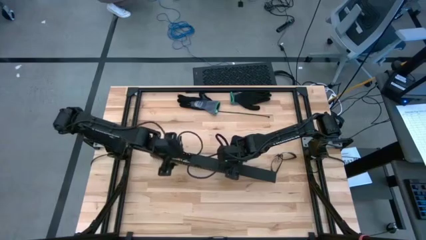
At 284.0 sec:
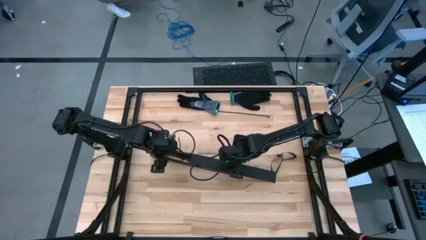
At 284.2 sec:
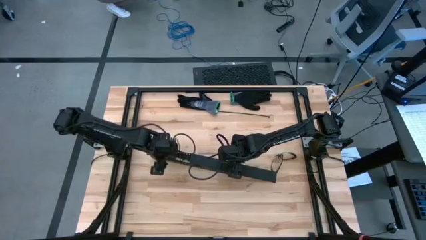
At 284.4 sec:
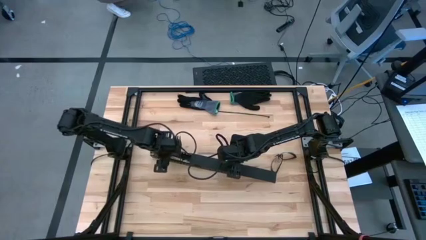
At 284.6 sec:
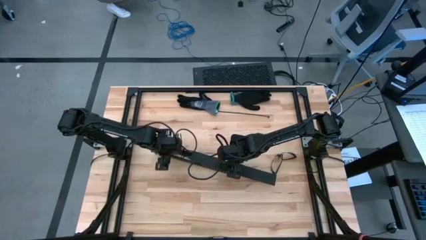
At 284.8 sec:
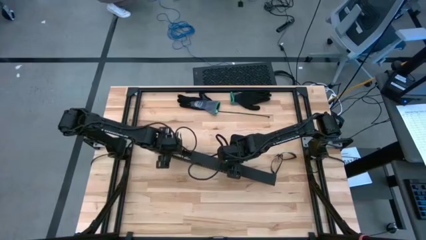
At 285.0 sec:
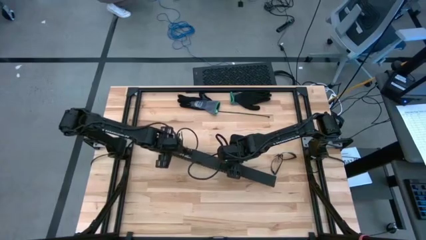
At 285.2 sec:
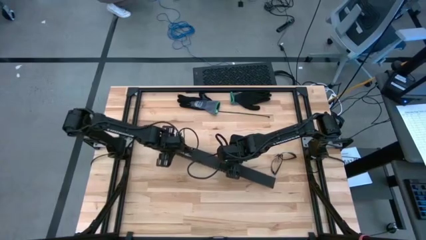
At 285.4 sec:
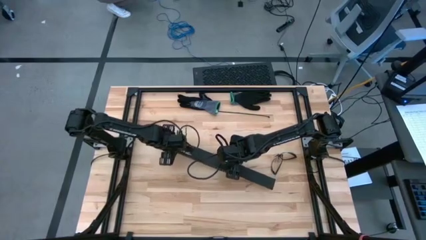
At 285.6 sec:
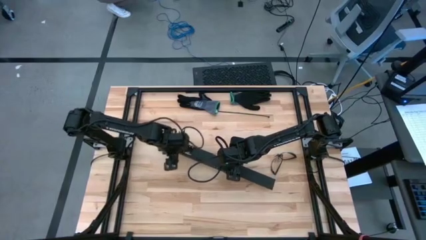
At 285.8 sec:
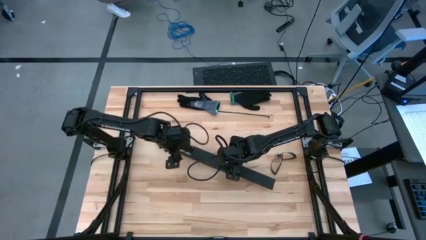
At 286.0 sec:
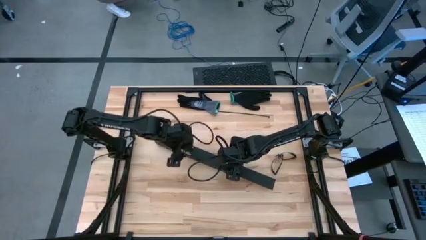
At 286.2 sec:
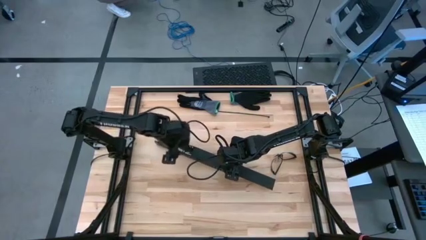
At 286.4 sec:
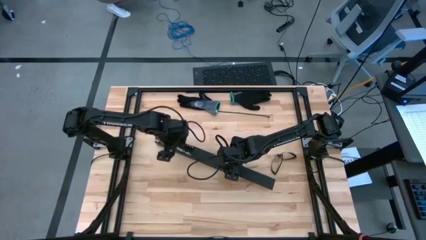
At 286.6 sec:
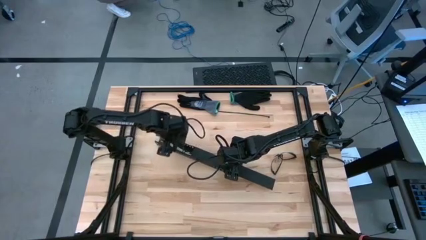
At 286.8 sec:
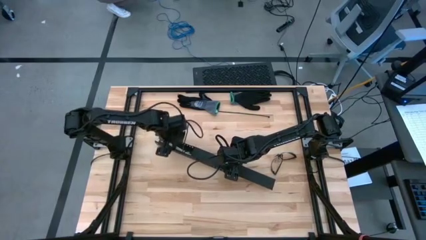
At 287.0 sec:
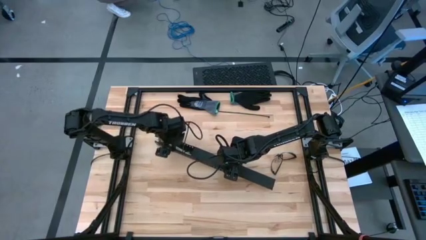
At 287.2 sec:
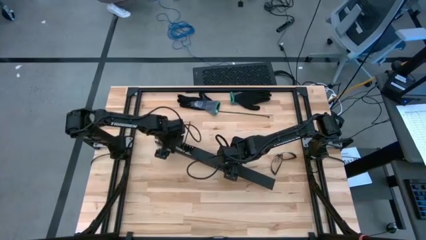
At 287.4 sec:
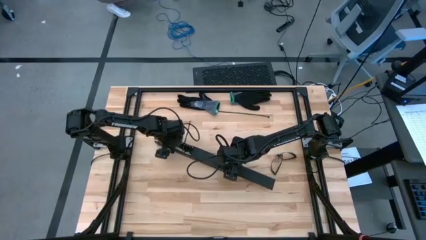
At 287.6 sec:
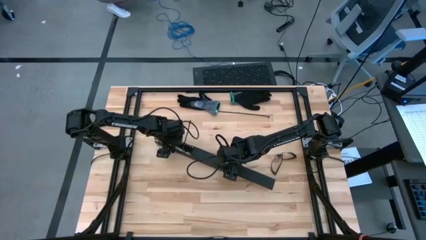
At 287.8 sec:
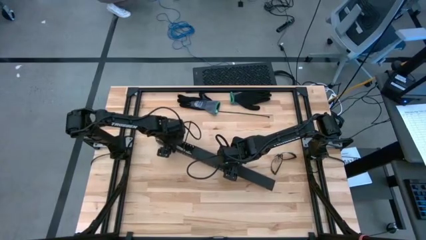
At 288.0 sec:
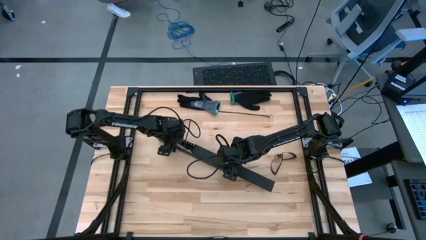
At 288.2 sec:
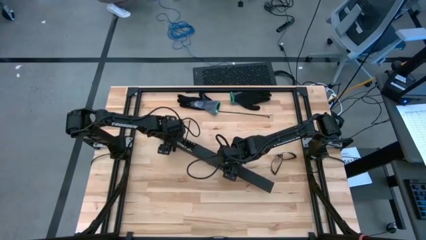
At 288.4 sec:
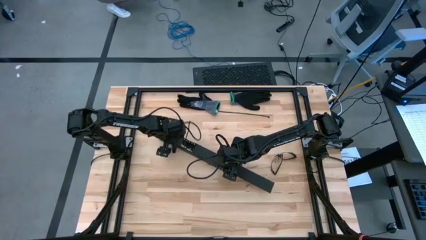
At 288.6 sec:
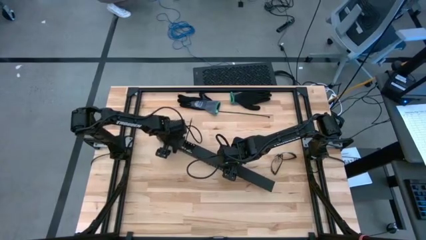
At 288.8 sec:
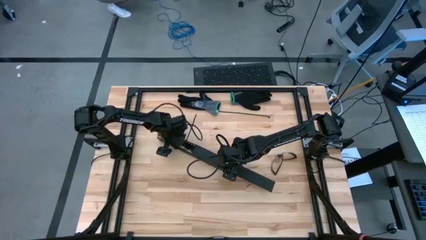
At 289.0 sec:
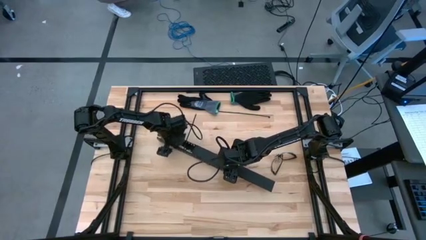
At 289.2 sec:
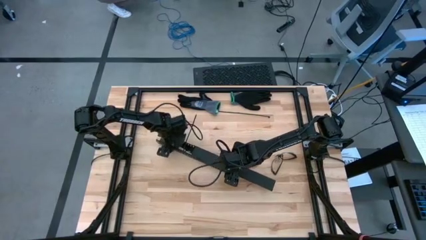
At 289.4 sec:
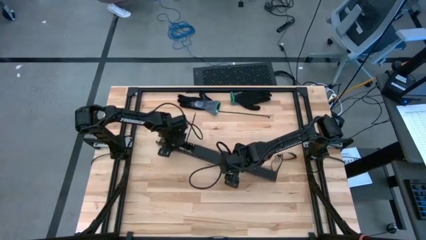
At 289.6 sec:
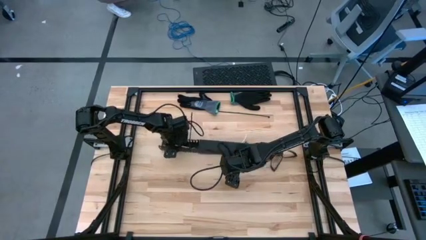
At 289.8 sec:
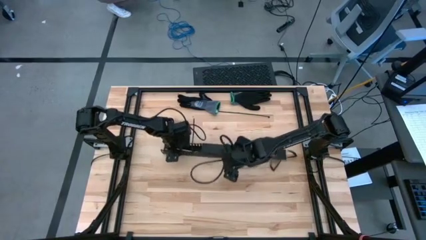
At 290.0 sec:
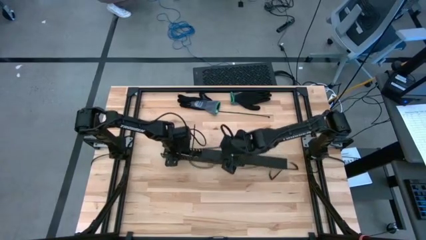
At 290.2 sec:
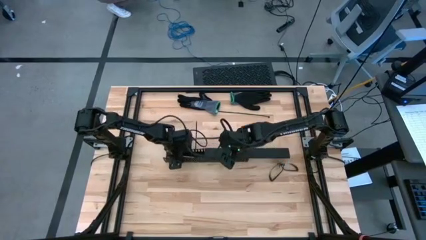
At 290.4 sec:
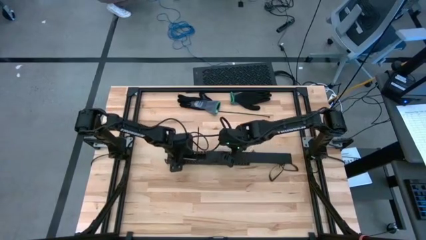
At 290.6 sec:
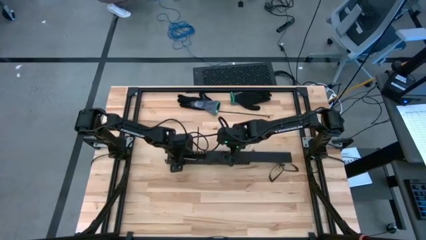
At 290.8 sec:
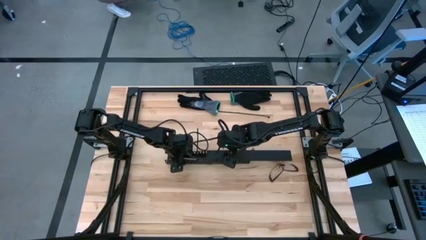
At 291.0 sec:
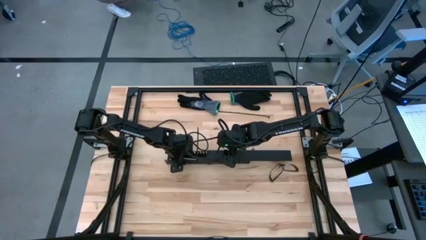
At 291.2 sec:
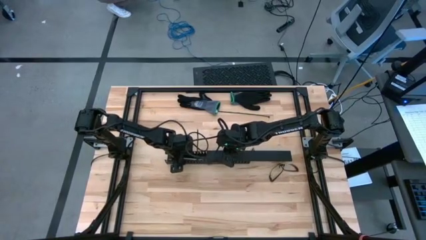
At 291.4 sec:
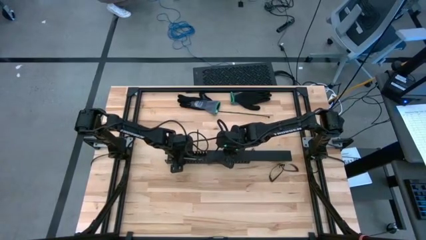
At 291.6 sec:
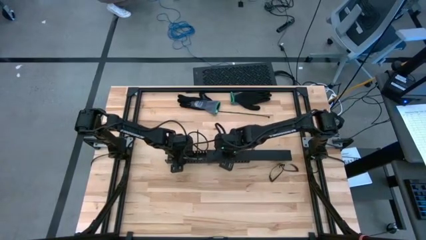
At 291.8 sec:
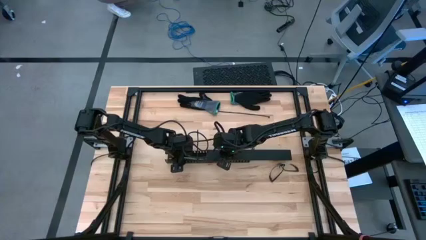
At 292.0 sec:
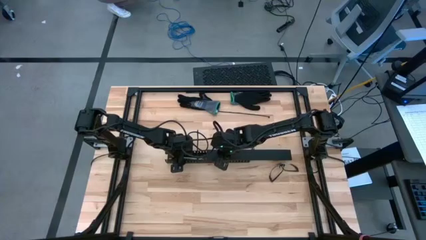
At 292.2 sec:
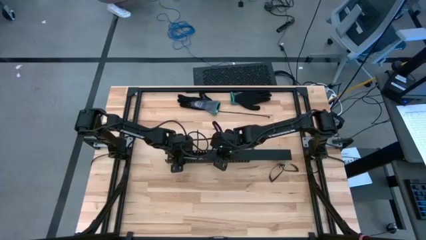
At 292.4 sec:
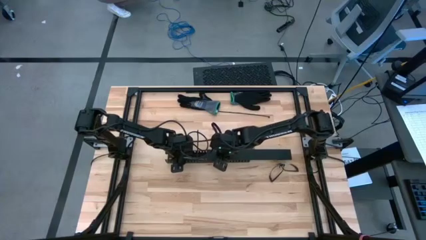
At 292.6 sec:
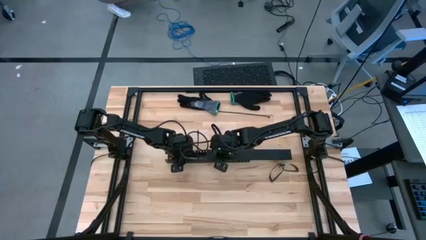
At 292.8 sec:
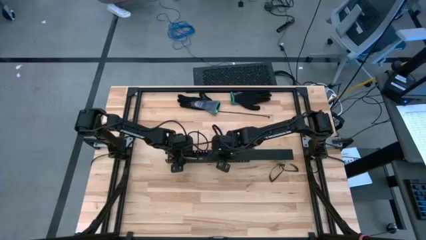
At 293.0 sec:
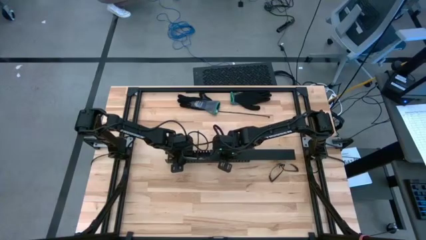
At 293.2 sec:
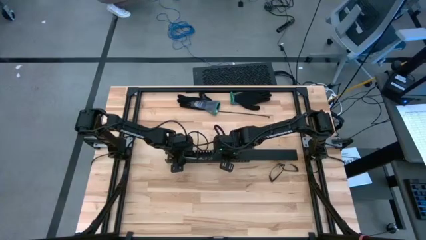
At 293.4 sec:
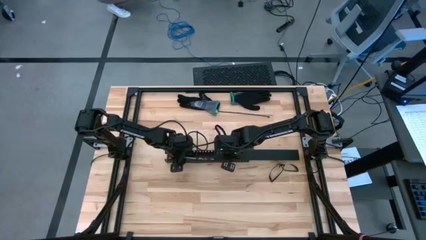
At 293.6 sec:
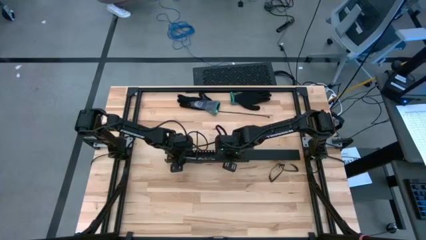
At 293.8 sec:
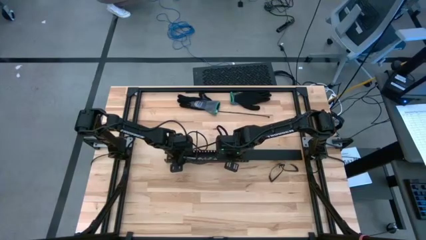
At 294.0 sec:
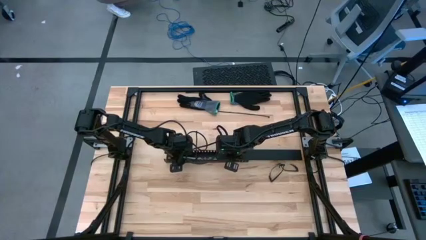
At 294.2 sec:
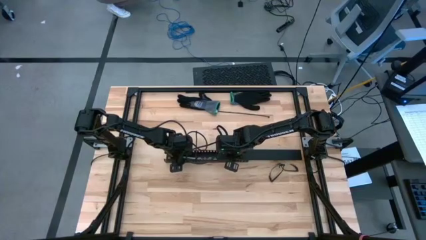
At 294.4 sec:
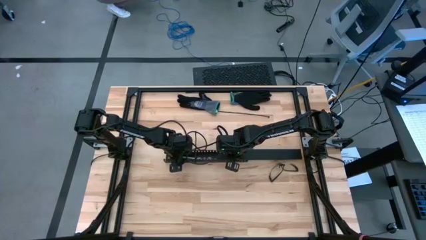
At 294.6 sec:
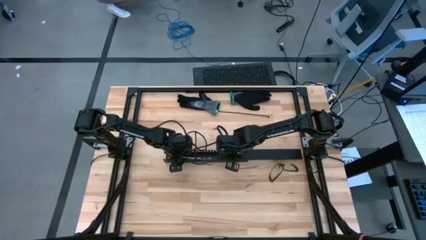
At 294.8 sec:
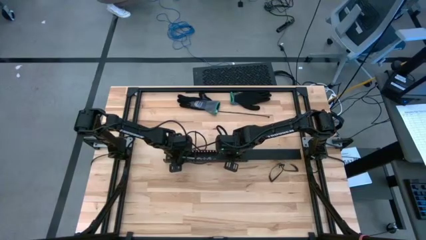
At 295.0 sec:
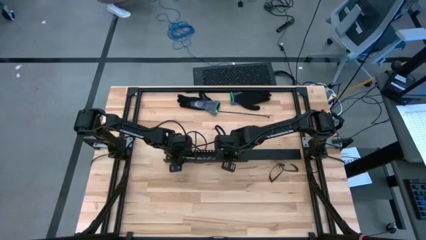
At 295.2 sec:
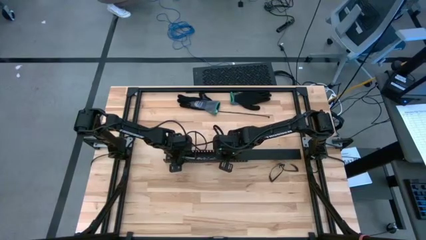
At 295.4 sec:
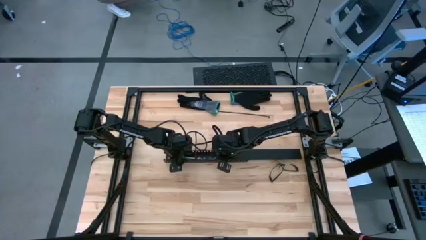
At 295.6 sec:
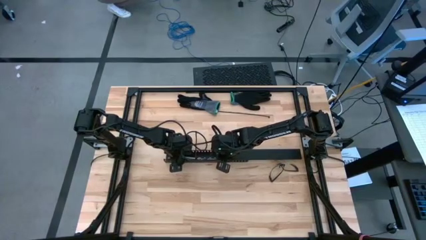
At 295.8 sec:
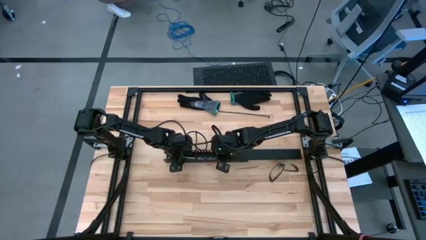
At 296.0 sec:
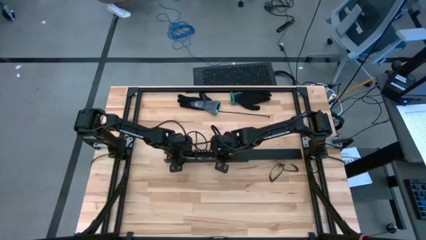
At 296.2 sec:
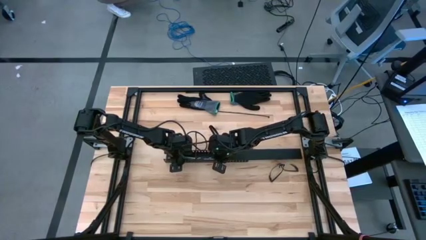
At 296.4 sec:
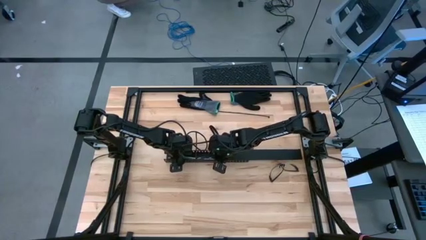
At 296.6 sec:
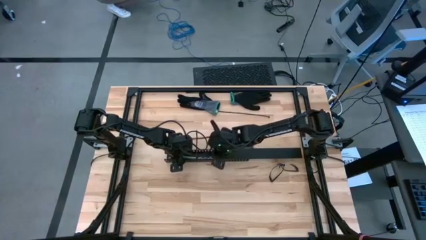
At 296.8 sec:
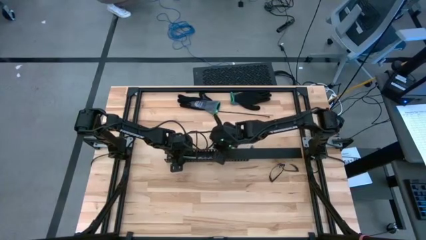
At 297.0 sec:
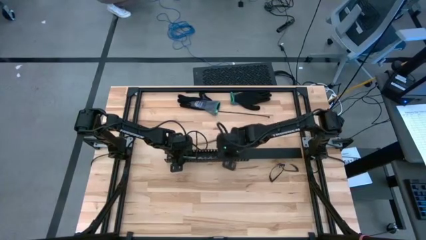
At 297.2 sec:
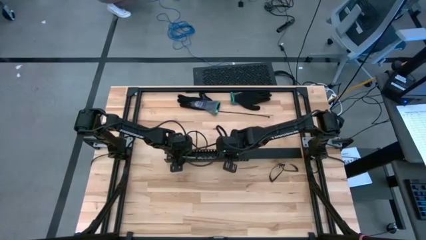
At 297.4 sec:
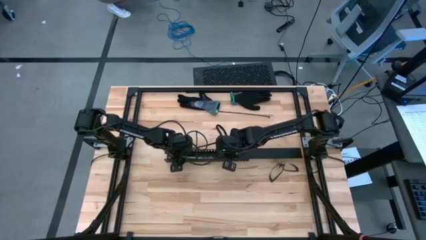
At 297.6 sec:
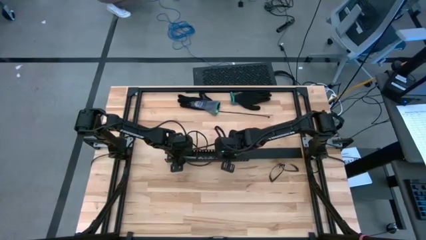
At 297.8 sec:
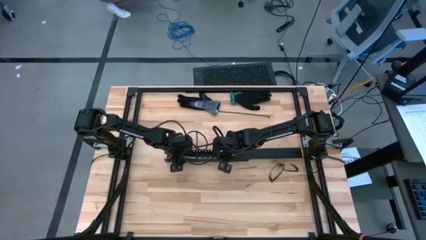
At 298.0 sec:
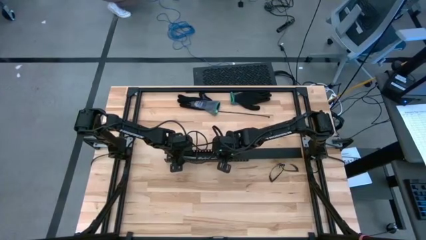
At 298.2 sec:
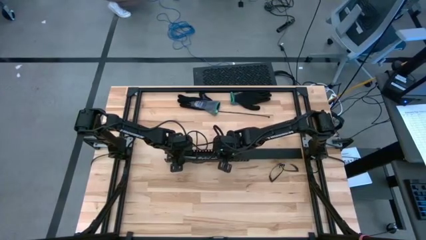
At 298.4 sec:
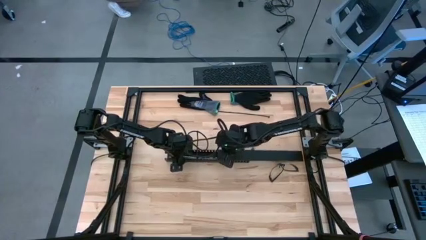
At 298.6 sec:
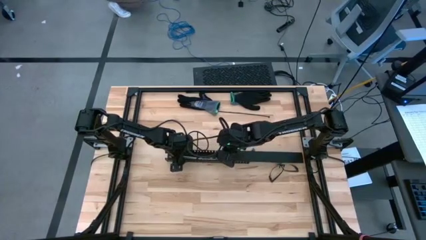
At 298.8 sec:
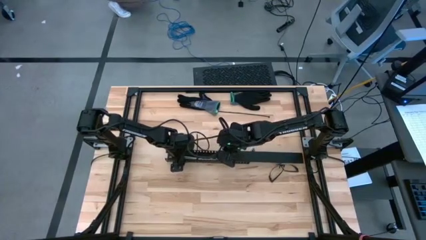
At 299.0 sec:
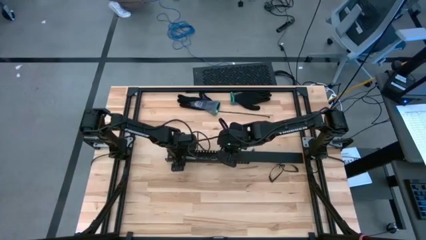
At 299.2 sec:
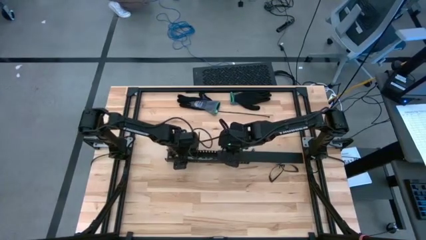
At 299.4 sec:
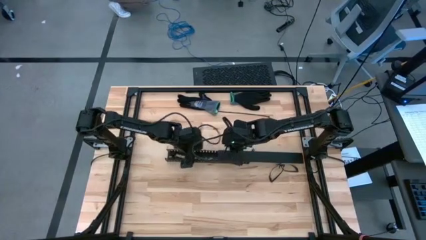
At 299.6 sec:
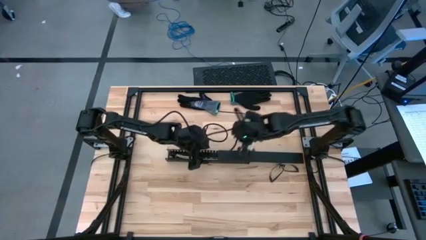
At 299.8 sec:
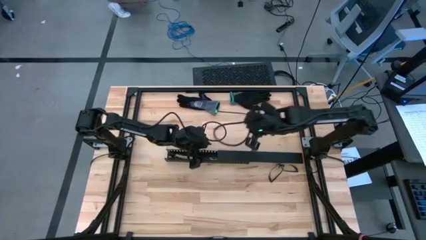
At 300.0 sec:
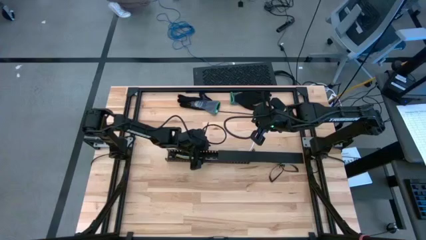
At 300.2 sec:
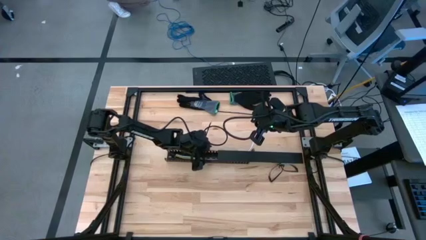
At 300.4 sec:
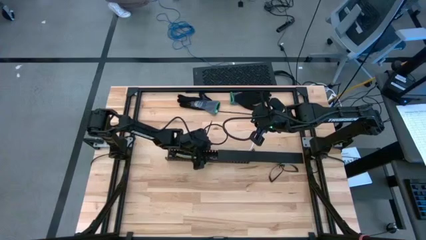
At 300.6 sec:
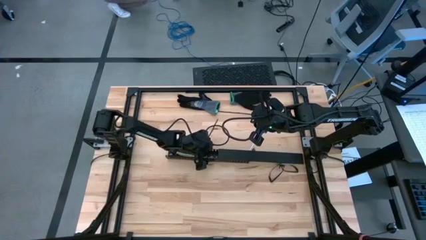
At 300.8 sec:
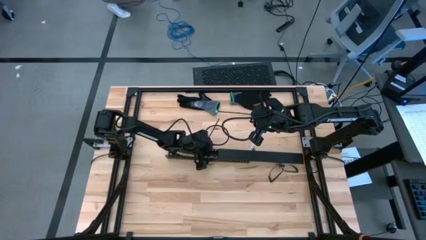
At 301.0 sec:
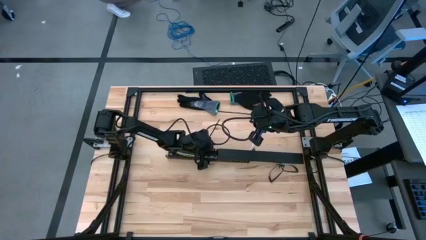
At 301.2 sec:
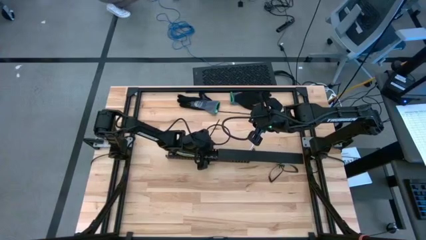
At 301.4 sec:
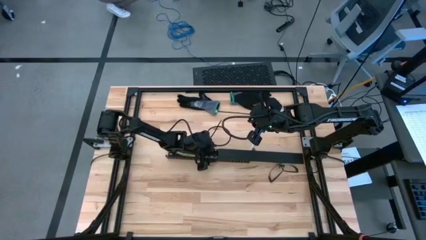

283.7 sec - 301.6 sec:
Task: Ziptie cables
Close the black cable duct
